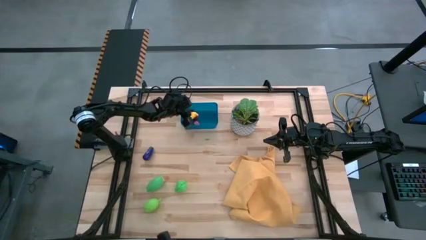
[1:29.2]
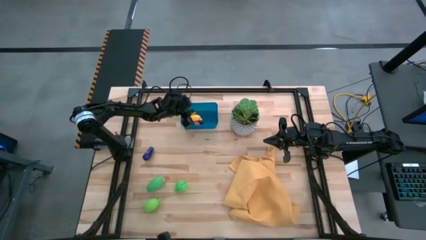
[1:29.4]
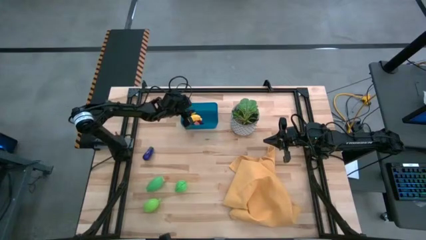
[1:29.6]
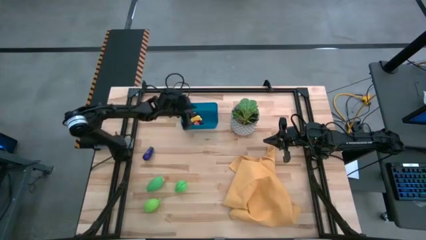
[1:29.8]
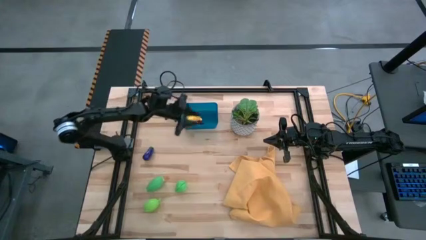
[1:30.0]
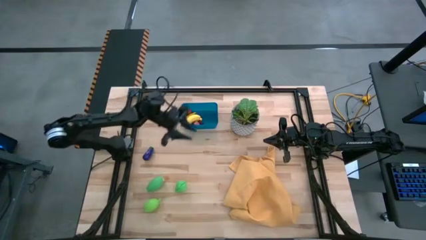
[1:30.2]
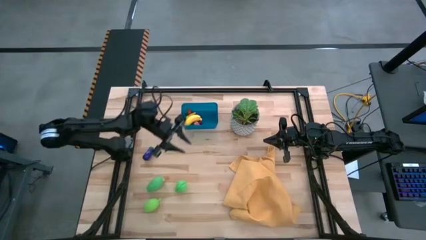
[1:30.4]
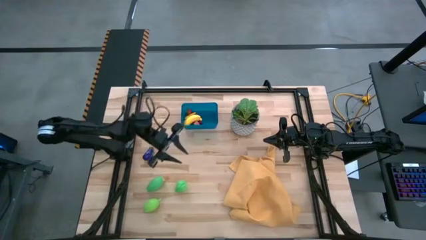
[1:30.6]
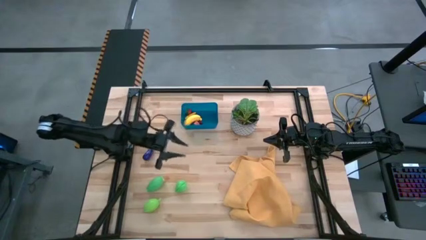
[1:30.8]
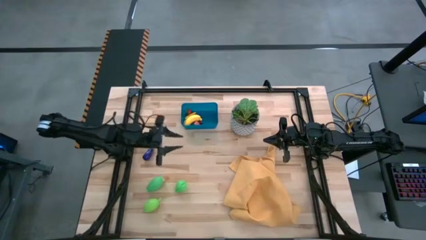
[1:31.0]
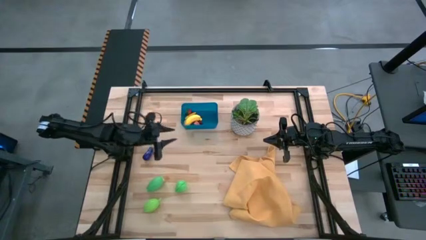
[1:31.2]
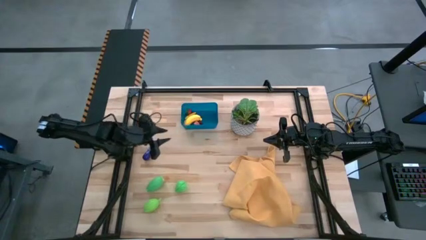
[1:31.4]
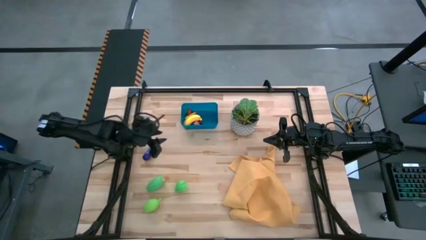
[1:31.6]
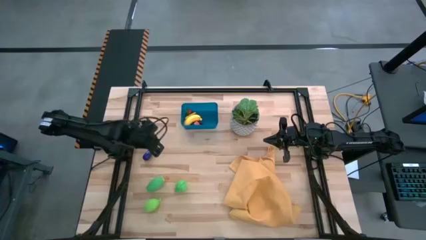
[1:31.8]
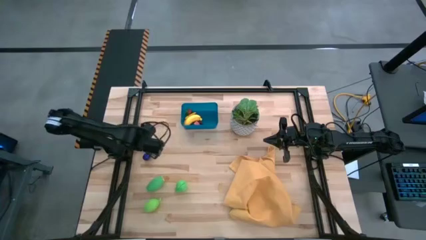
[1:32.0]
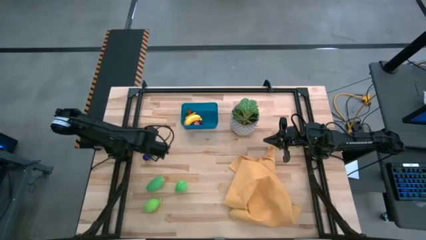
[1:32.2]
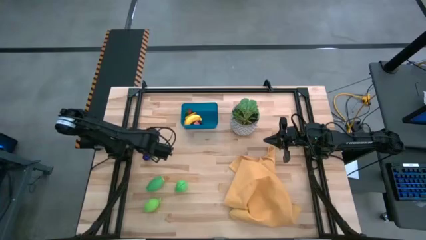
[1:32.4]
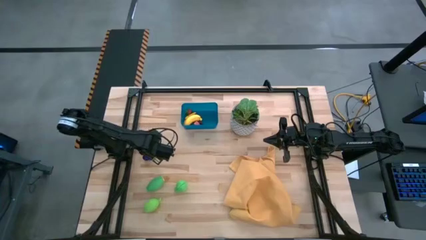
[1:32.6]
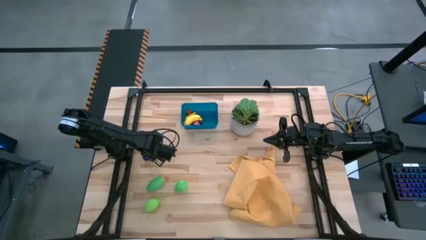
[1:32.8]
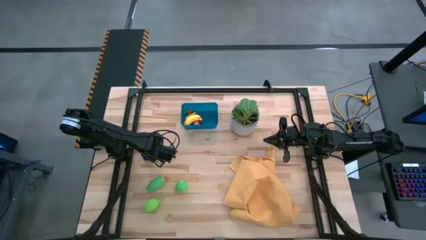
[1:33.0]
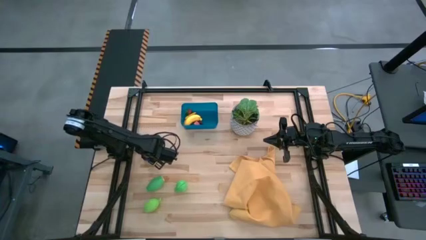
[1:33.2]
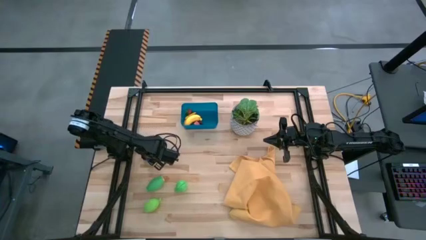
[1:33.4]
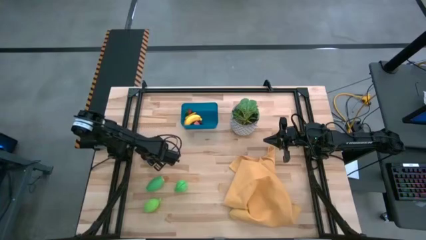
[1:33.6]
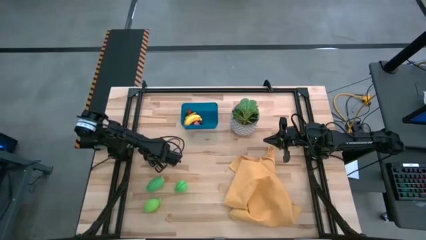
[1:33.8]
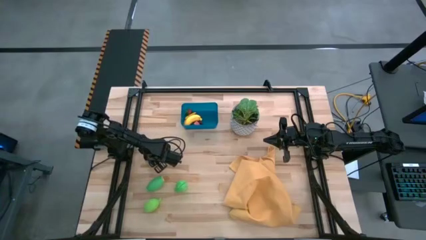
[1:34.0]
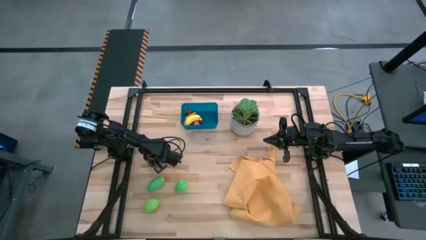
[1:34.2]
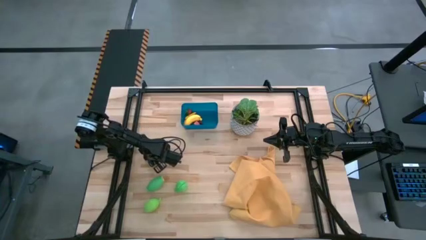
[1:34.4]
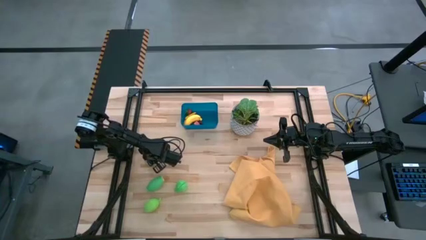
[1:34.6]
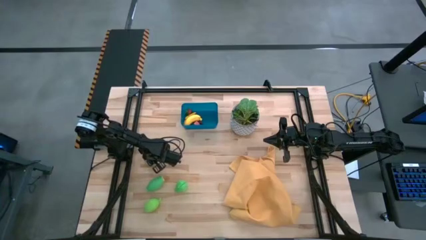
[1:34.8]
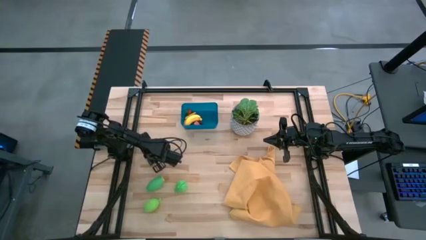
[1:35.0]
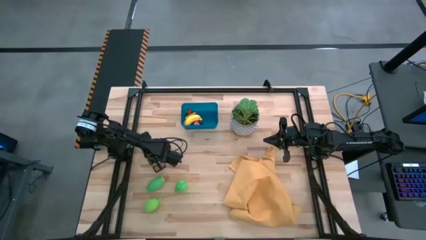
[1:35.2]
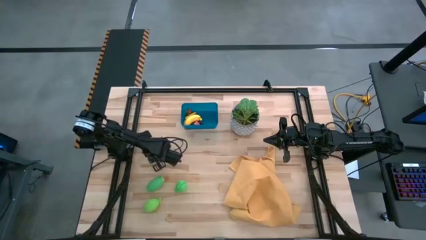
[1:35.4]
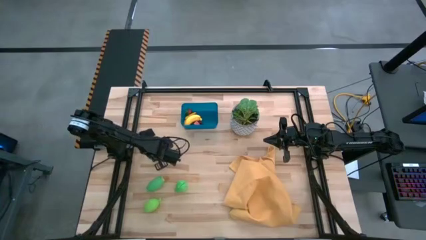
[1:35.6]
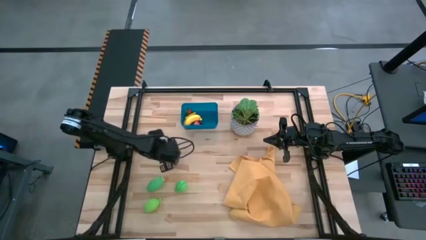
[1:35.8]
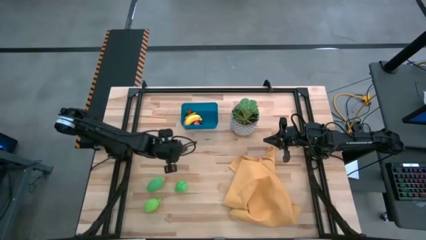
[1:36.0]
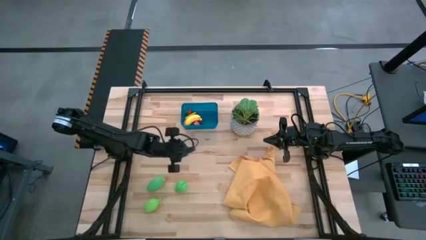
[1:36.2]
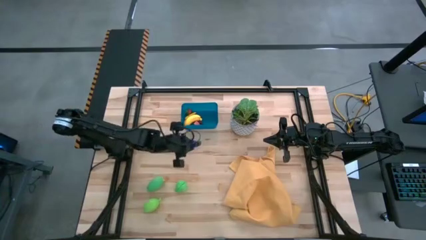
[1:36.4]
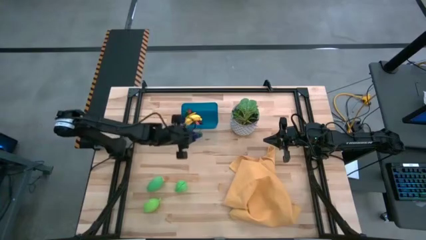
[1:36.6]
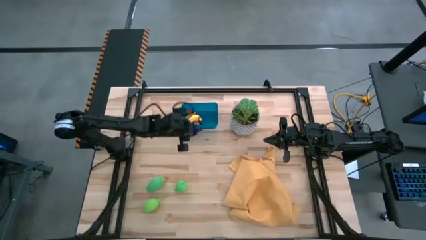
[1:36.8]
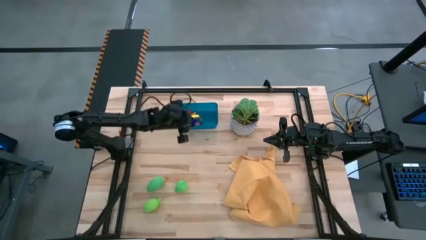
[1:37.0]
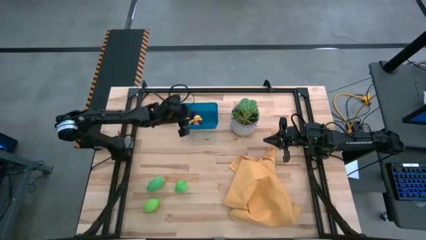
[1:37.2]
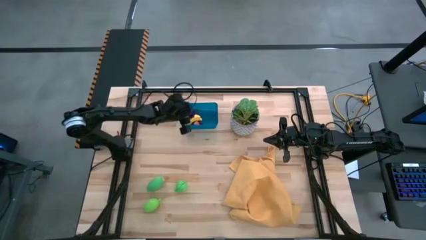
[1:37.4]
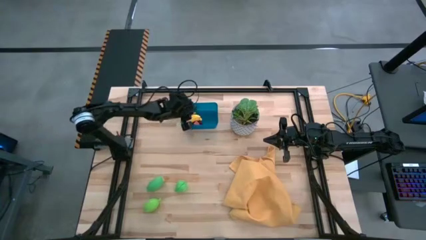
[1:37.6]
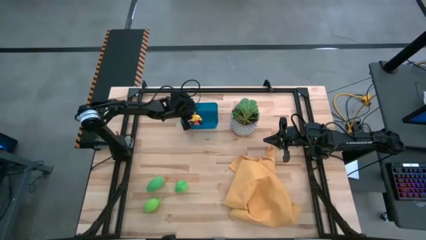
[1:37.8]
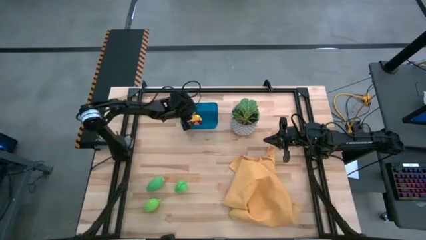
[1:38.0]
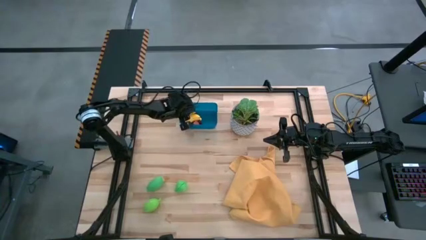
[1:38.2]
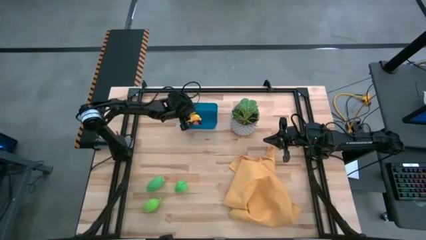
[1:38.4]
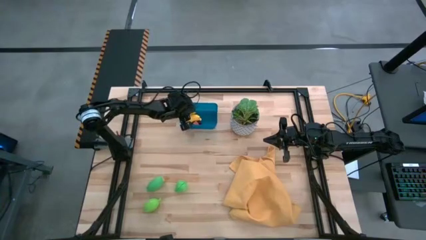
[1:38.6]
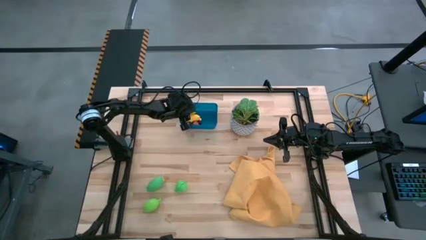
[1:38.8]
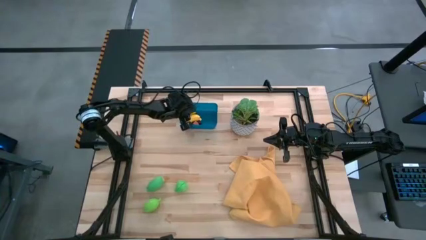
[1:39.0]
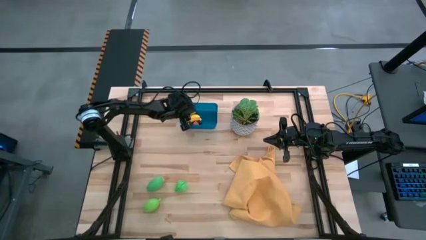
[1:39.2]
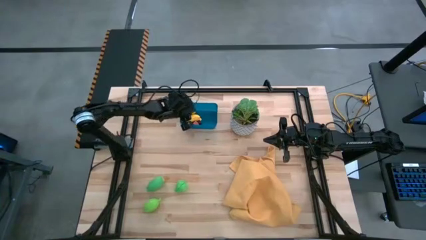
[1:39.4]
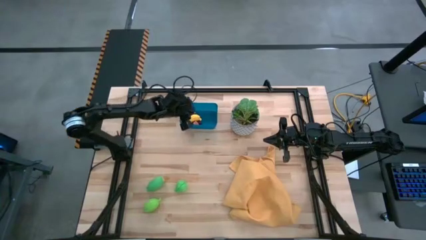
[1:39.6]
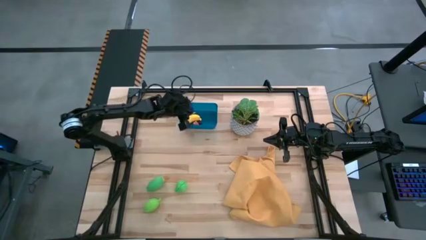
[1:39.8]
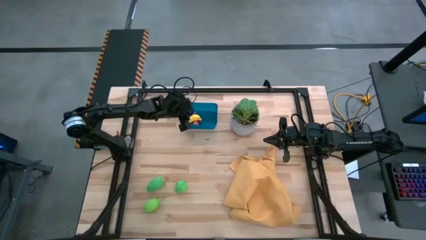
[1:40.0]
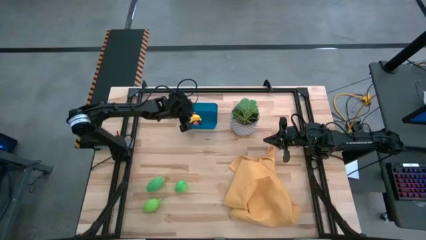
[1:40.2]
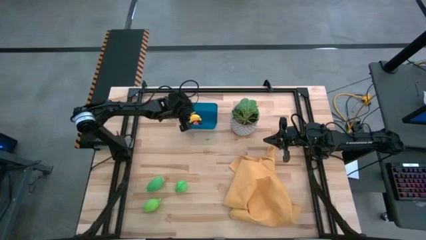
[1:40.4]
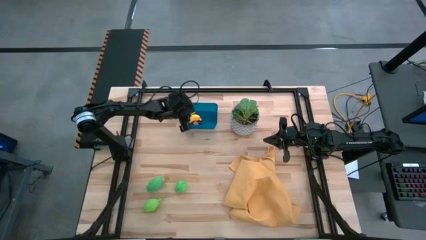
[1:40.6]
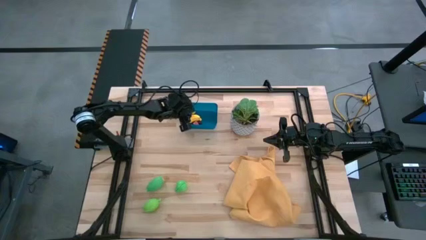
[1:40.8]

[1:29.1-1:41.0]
Task: Pick and placing Produce into tupperware
Put the violet eggplant into the blue bin

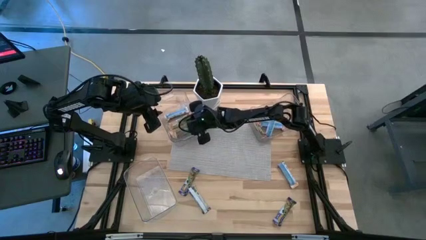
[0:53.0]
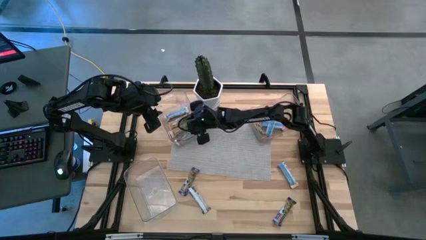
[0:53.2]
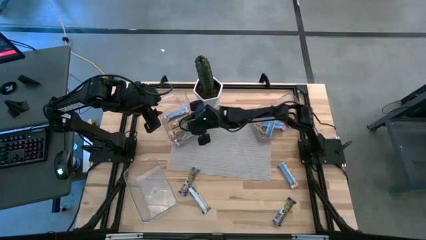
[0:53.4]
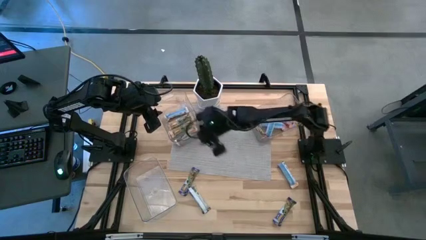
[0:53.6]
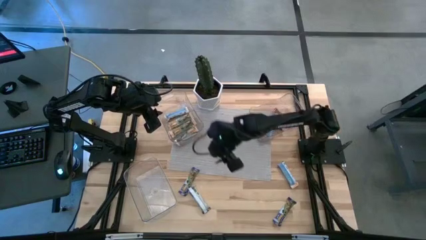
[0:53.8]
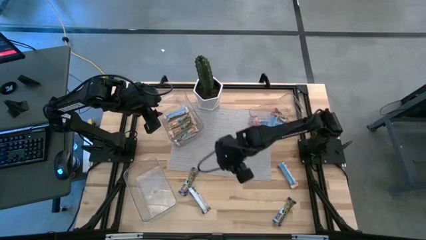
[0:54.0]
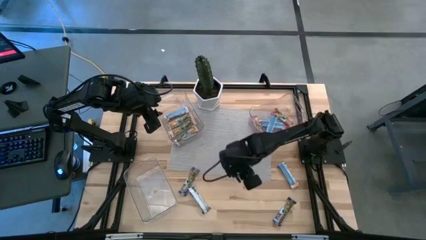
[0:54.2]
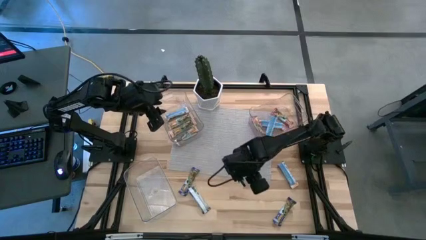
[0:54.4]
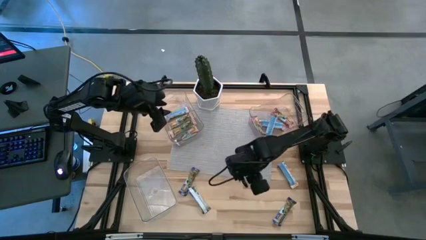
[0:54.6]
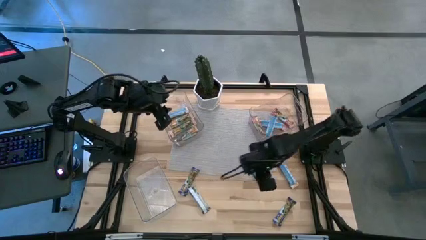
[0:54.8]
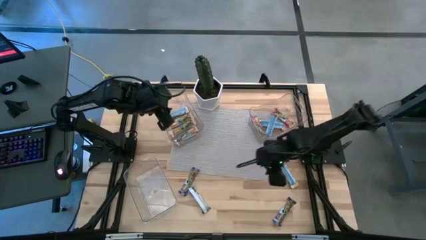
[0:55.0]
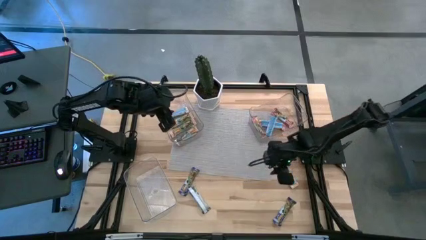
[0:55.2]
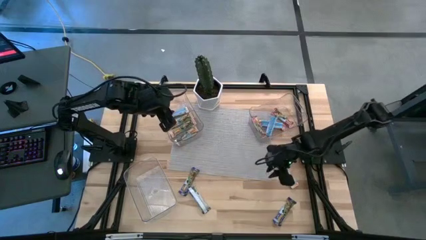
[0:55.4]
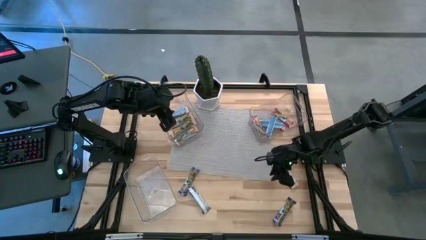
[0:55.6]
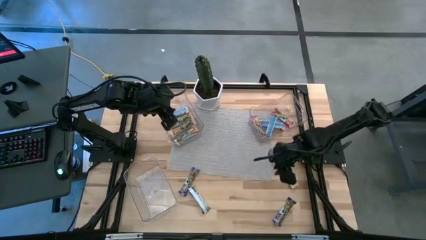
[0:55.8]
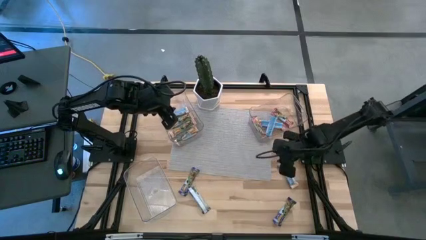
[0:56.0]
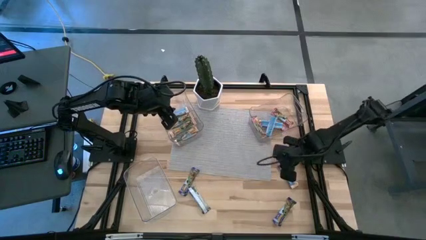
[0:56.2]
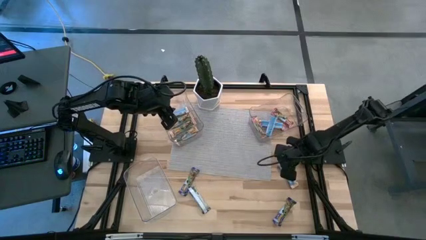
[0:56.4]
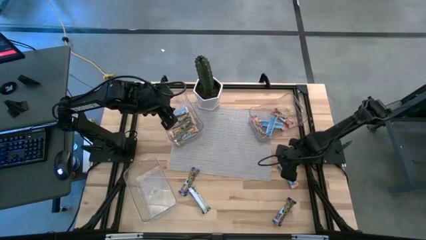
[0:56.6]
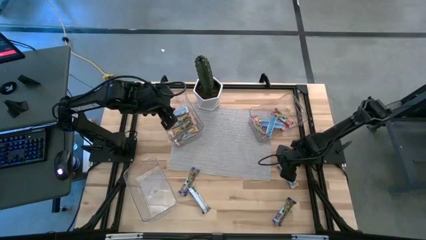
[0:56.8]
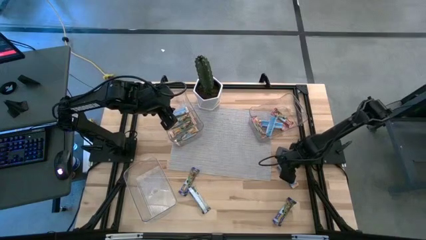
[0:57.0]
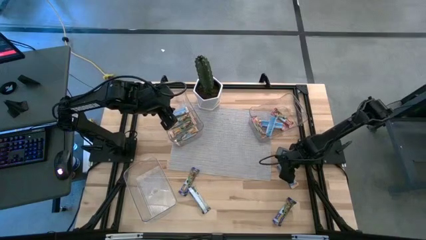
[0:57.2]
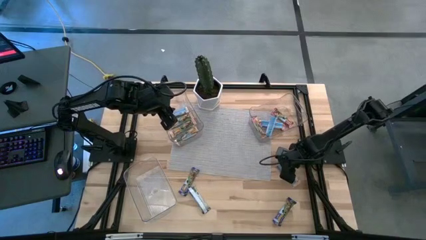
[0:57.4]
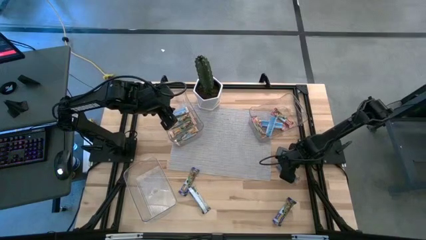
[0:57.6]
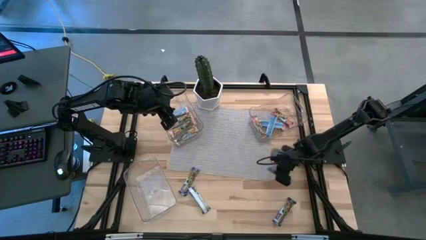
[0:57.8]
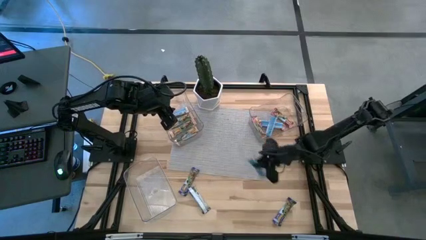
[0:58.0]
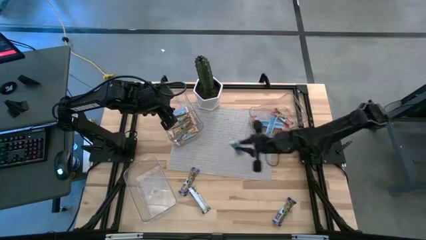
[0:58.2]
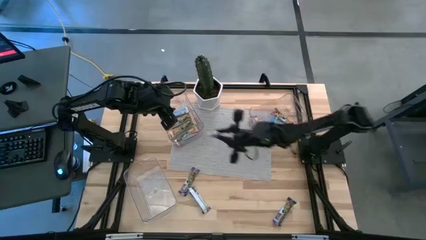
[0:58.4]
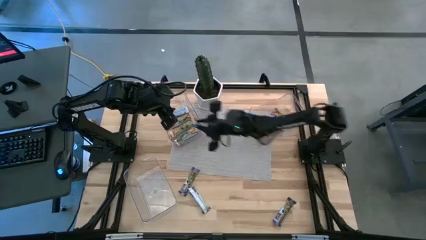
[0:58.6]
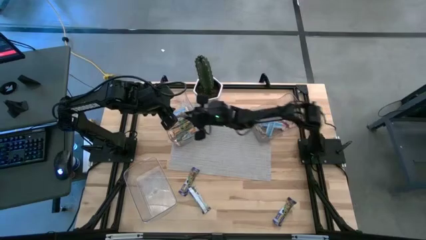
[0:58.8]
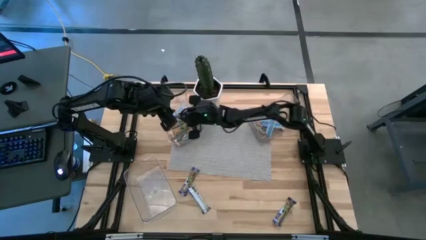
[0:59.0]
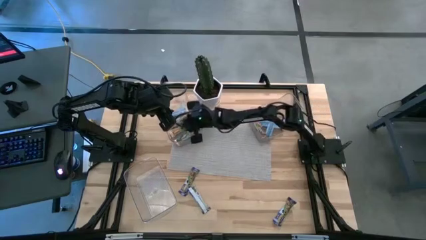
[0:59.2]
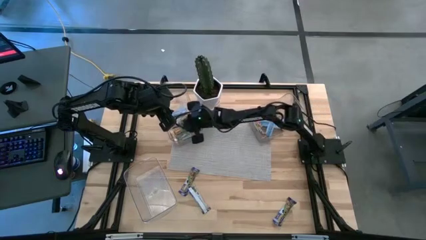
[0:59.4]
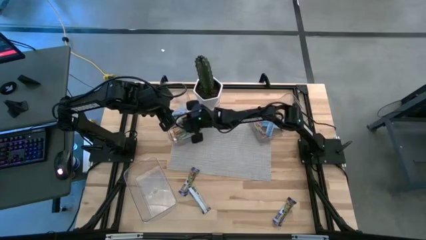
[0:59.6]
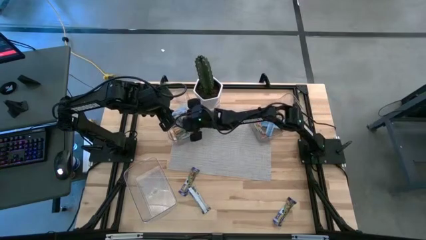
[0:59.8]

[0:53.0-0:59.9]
Task: Pick and place Granola Bars by type
Put the yellow granola bar into the top left transparent bin
